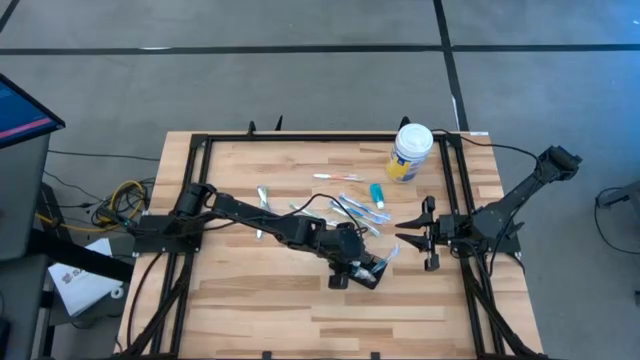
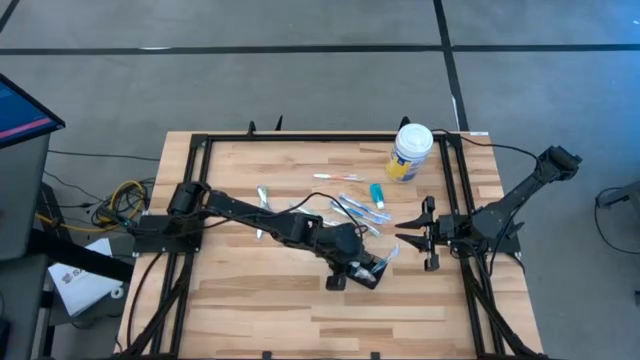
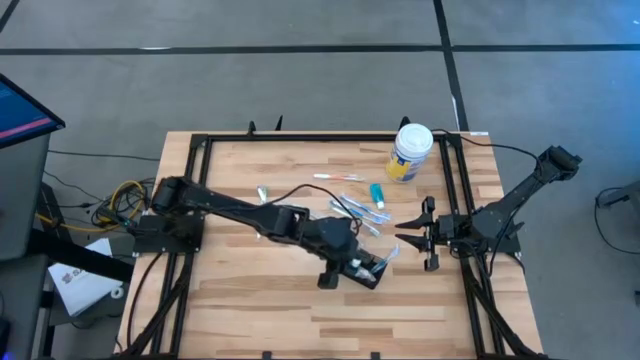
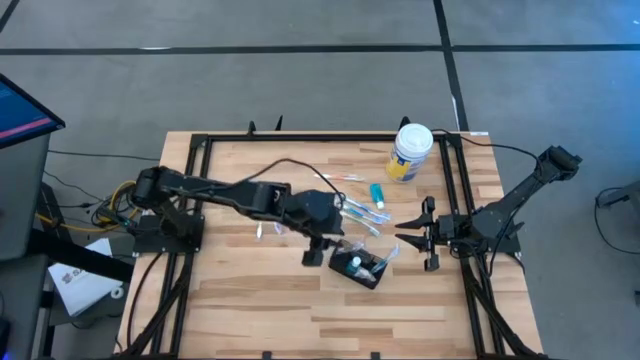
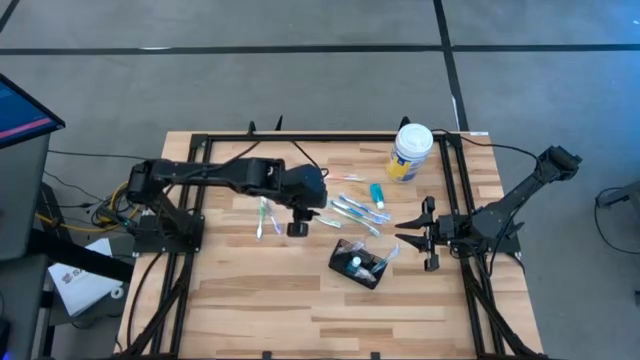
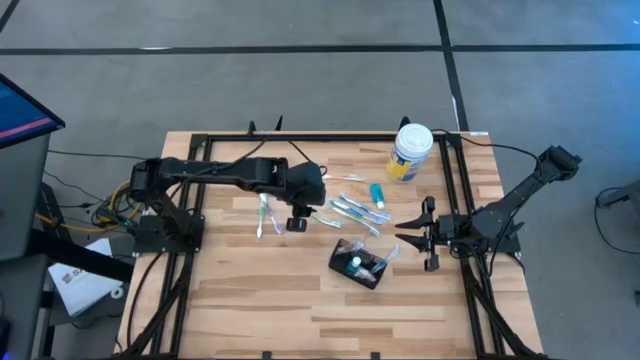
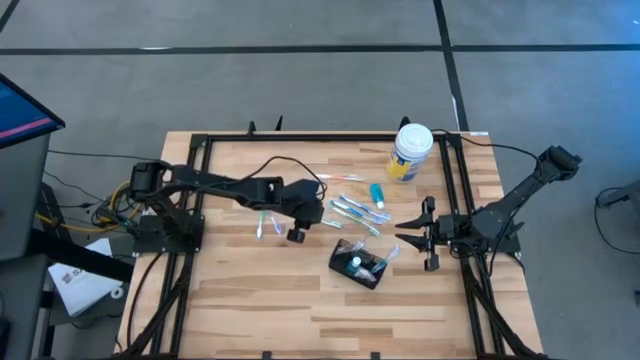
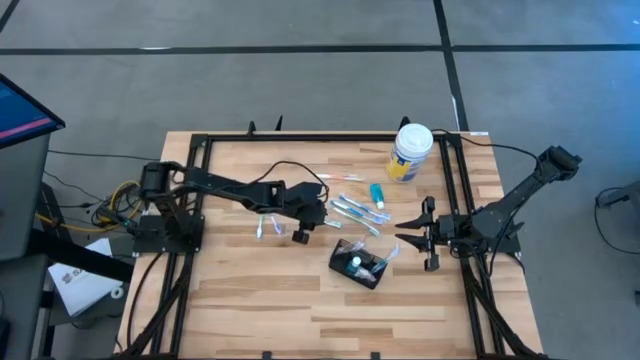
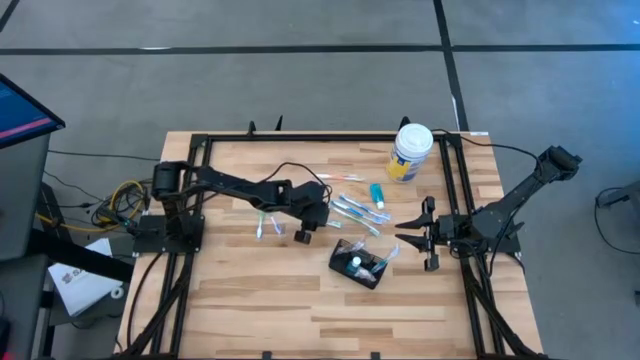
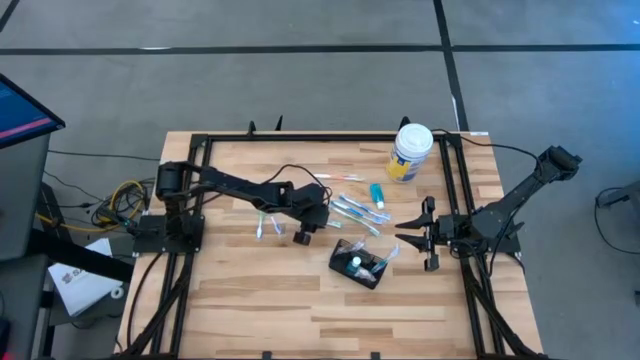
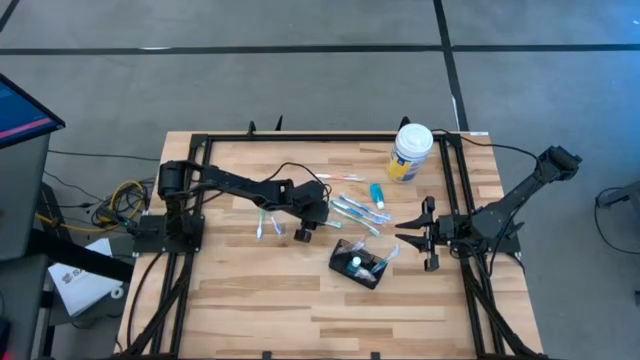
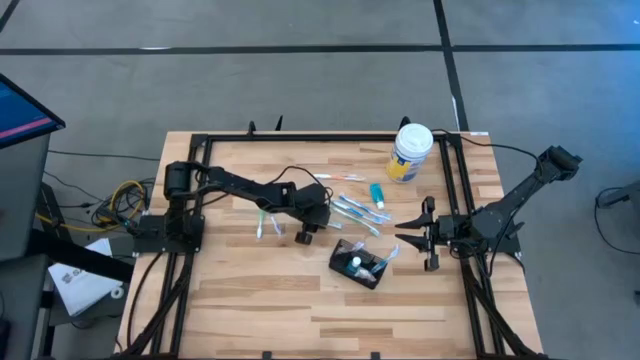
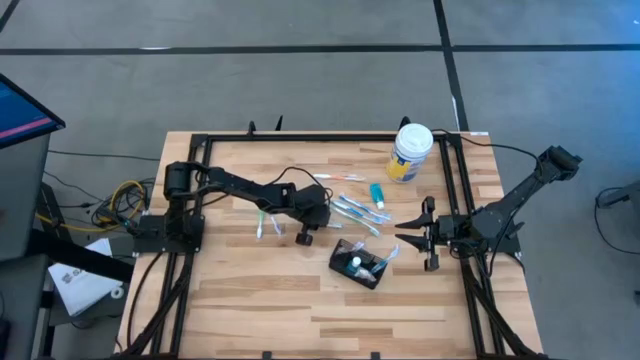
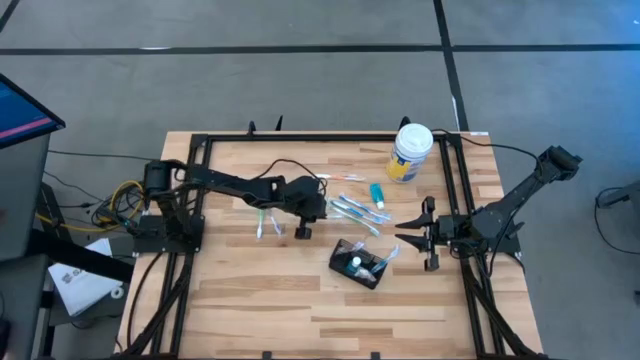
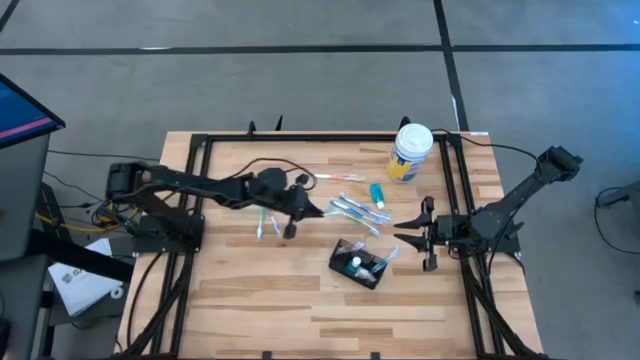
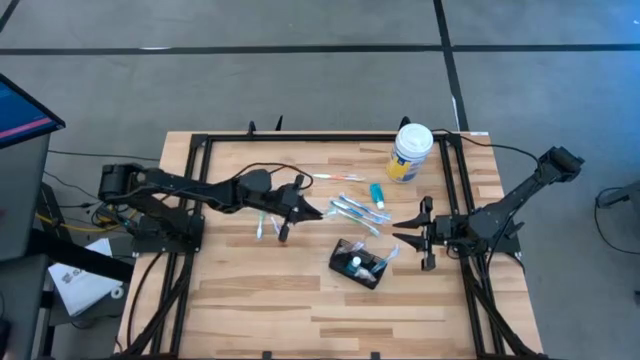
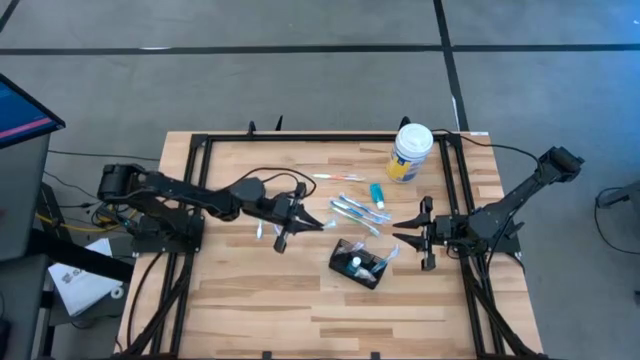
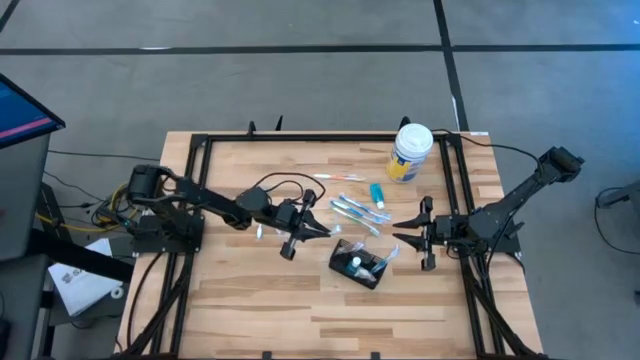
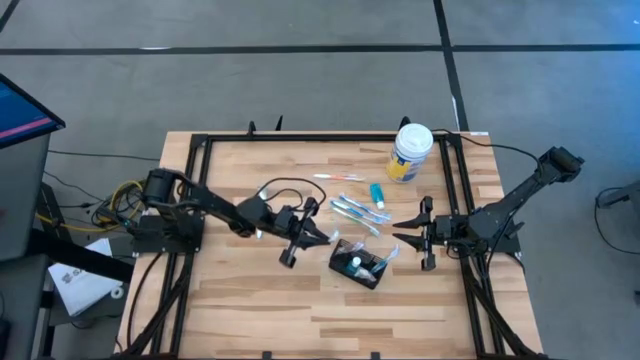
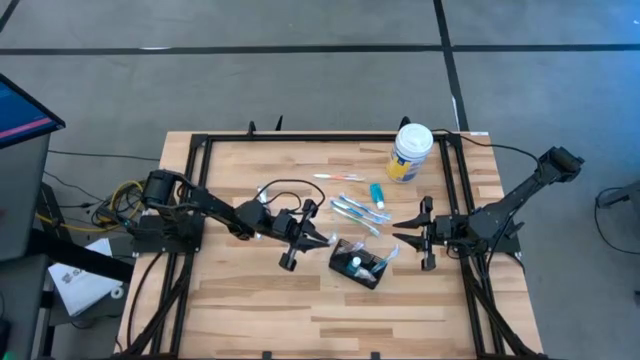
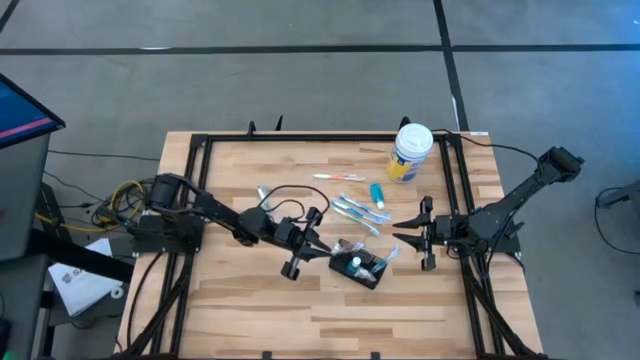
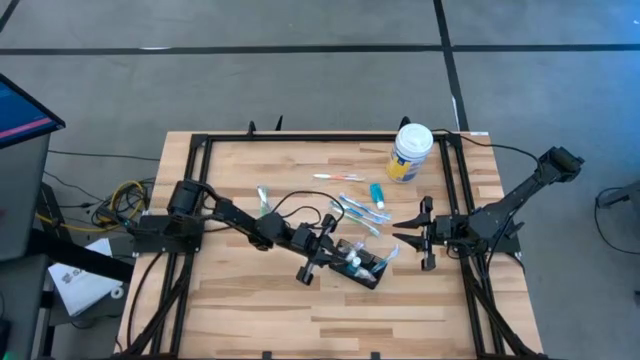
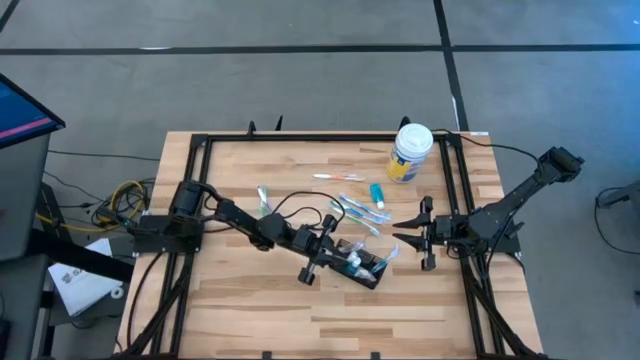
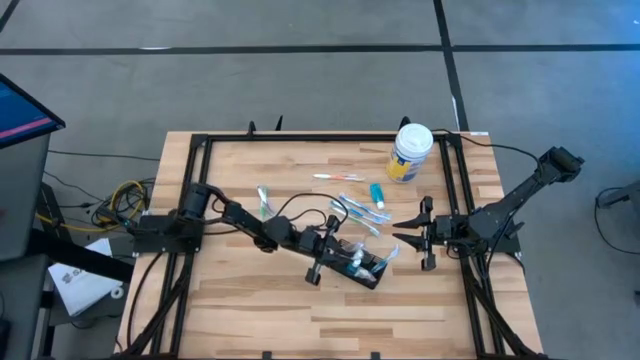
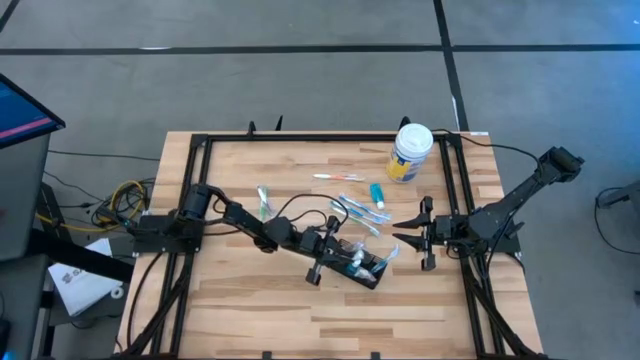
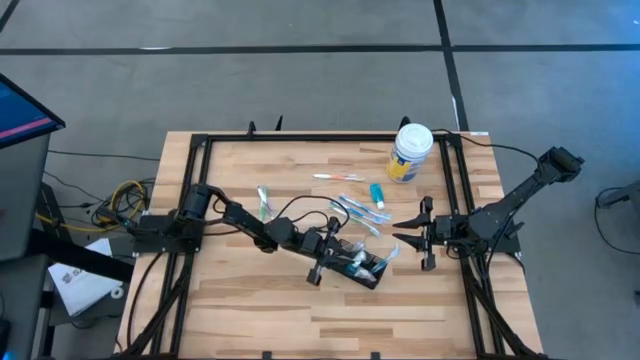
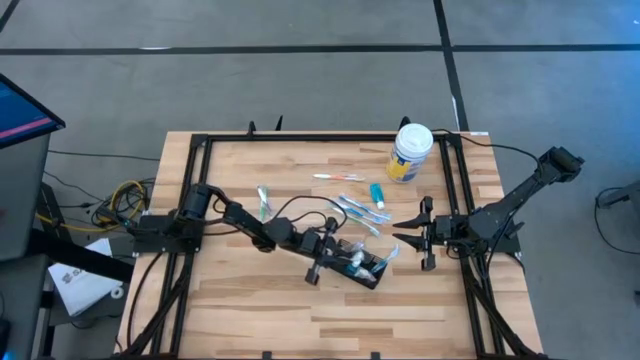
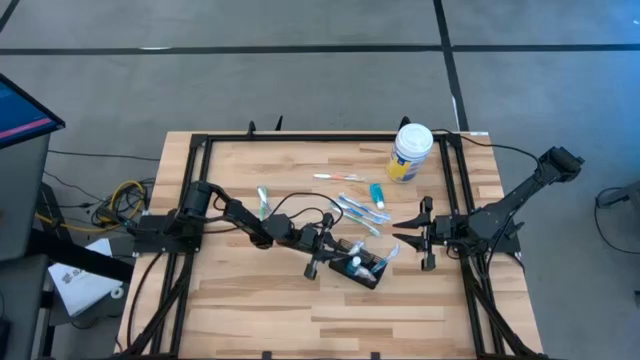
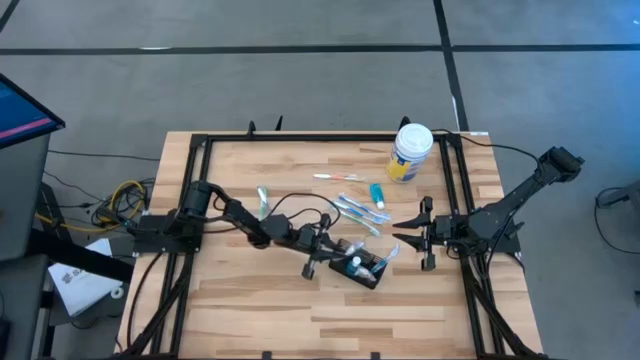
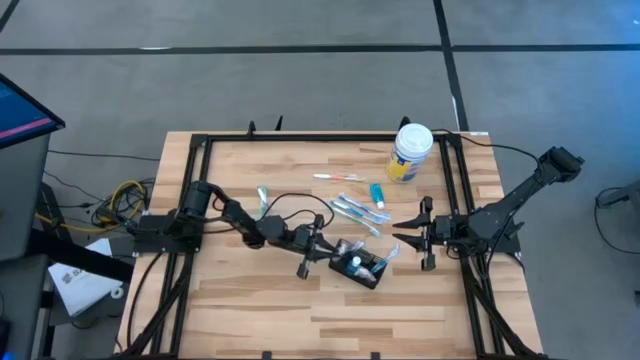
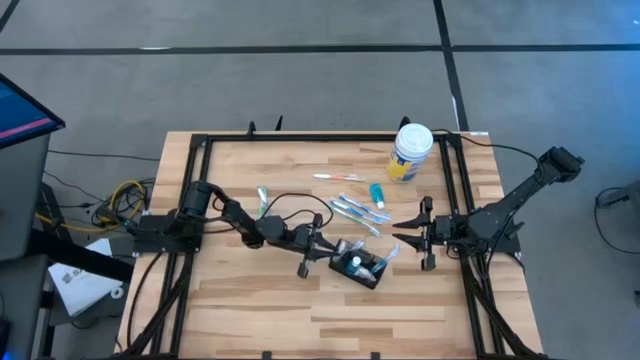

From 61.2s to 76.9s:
Task: Pick & Place toothbrushing station
Put the middle green toothbrush into the mesh organizer

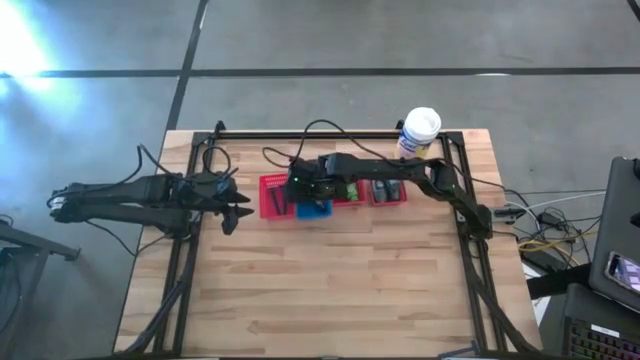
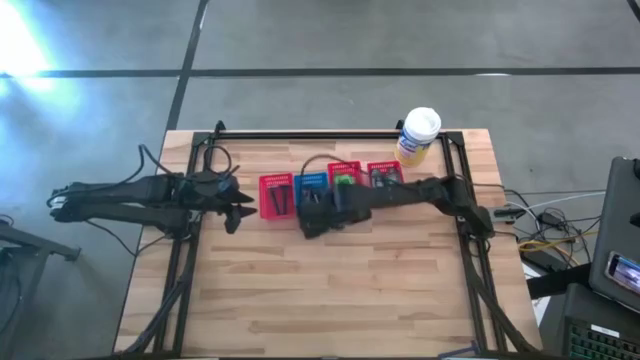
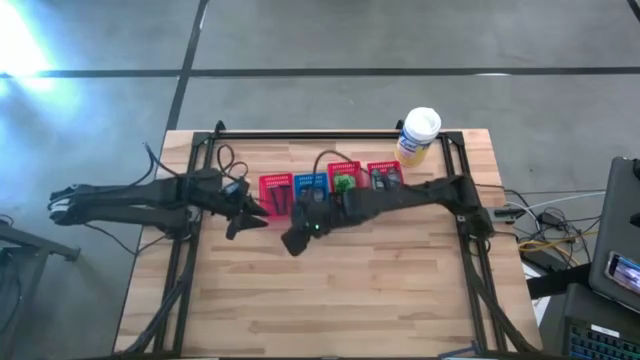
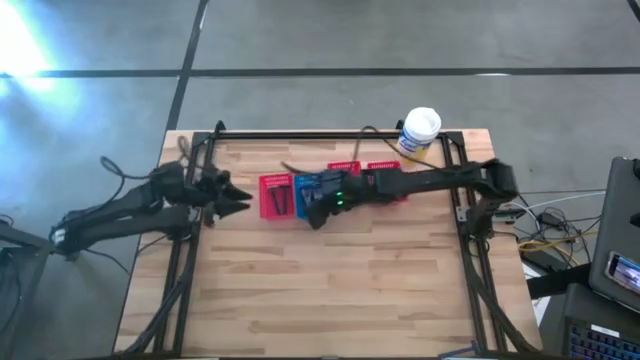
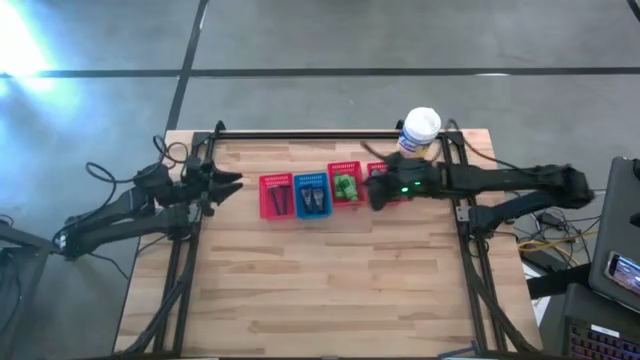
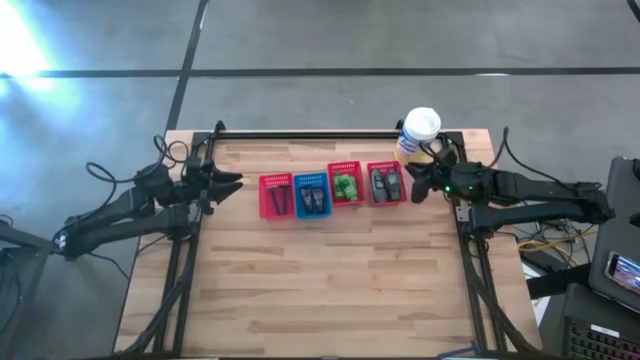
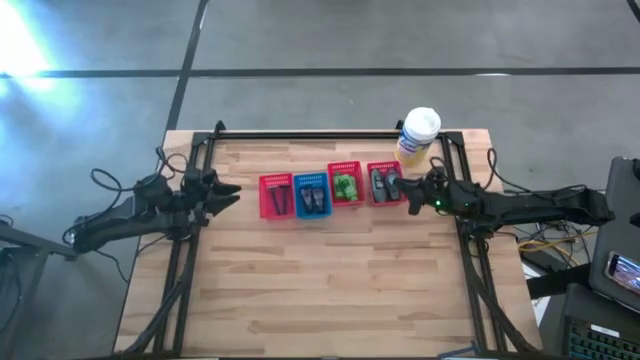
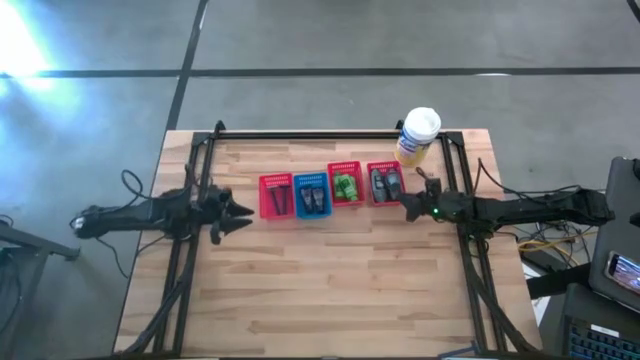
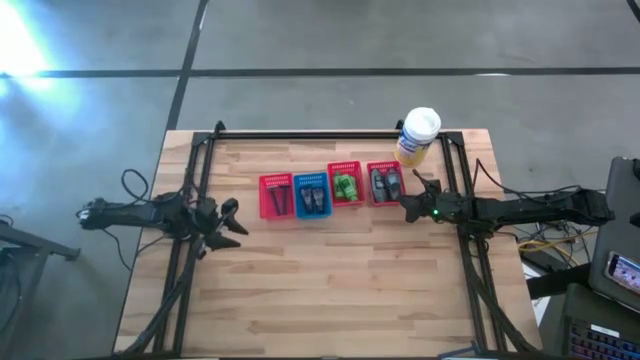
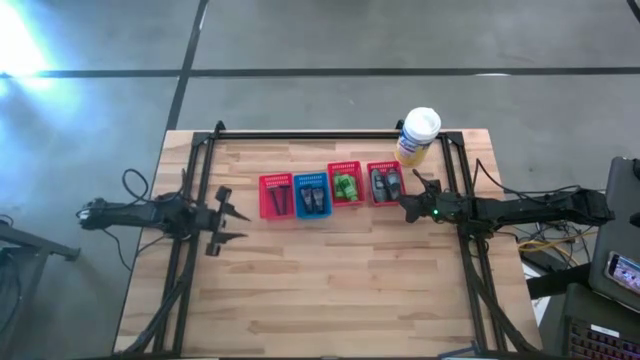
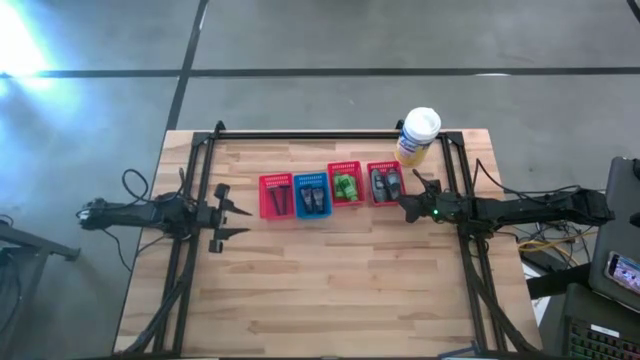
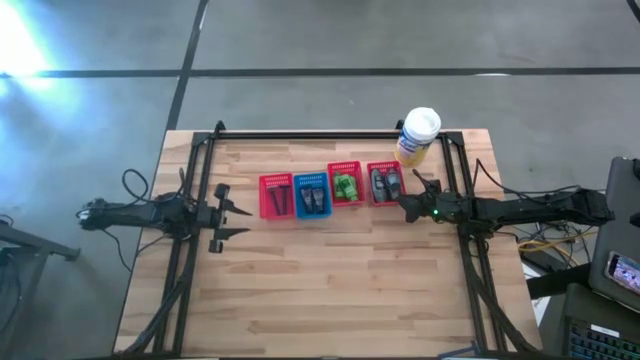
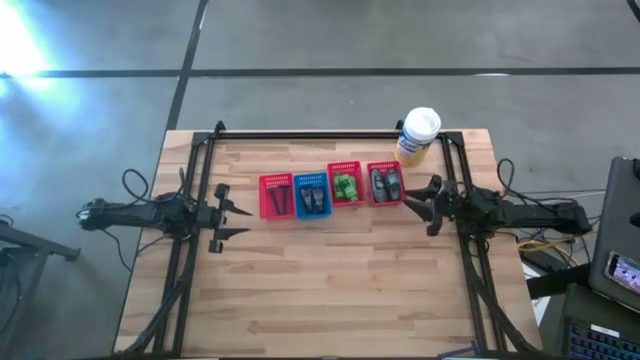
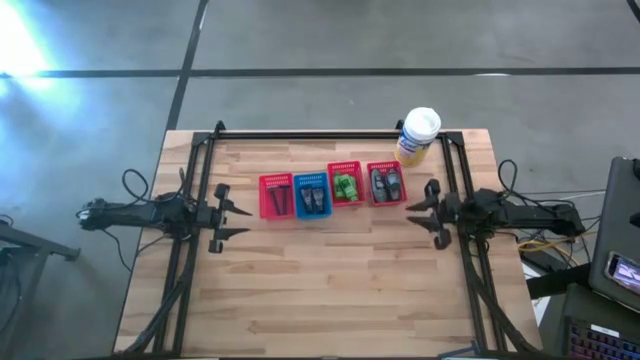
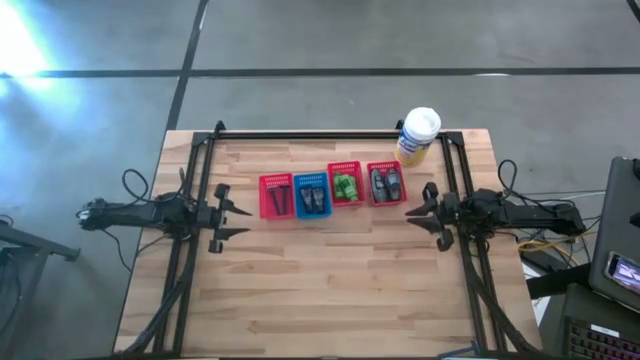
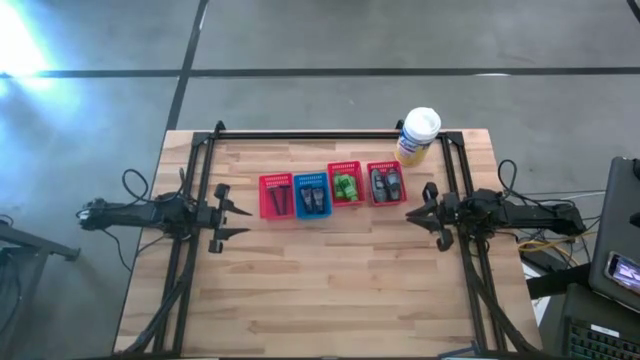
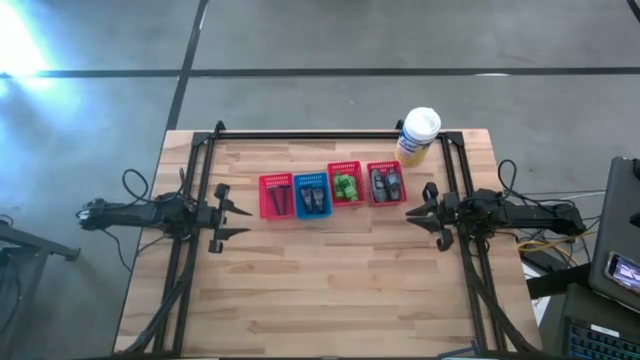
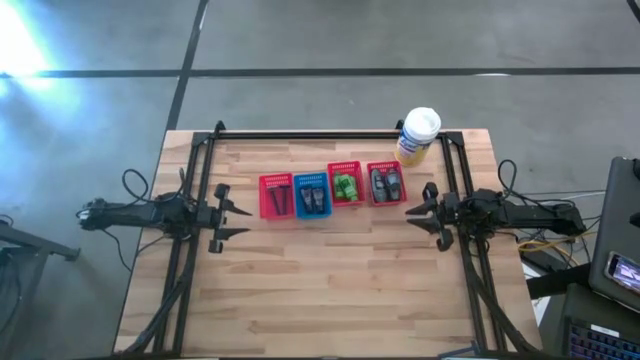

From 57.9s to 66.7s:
Task: Pick & Place Travel size toiletries
Return to Home Position
